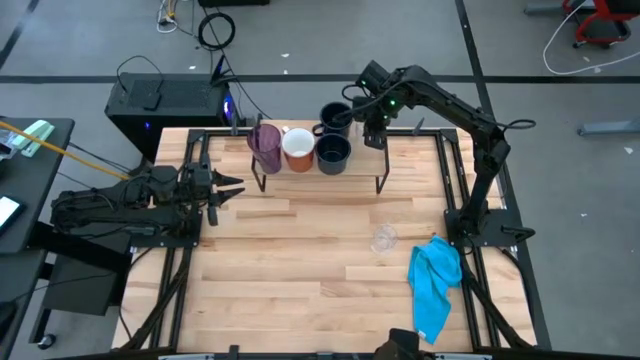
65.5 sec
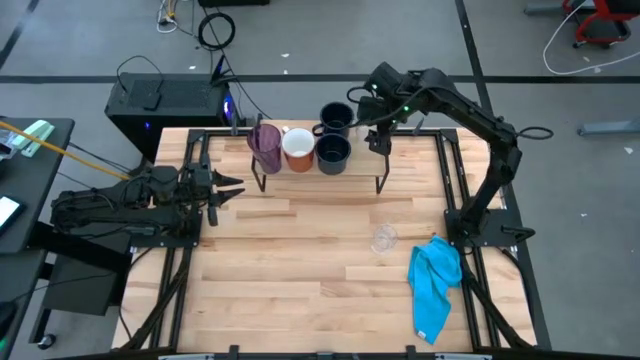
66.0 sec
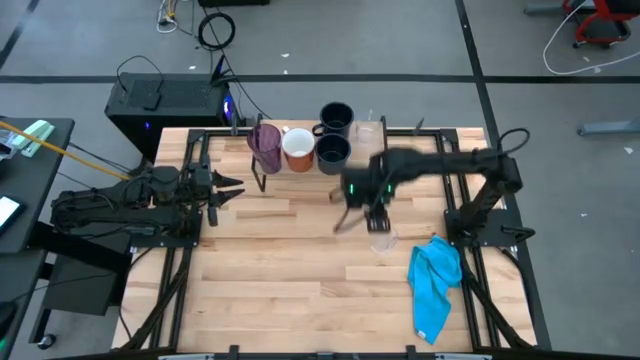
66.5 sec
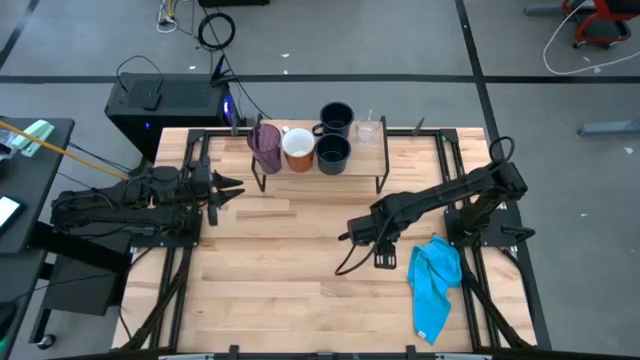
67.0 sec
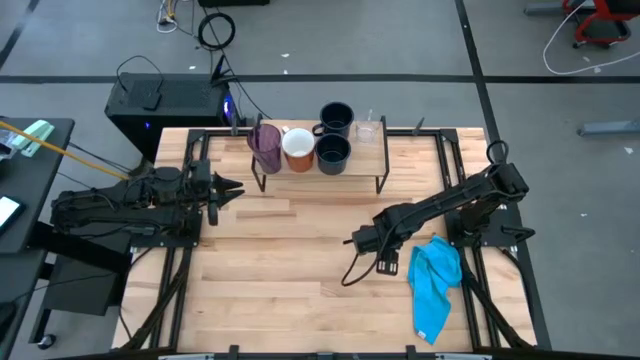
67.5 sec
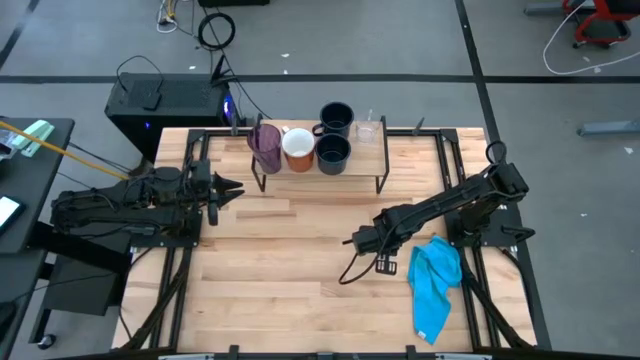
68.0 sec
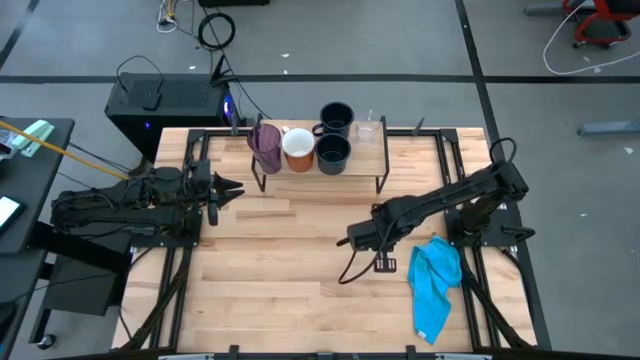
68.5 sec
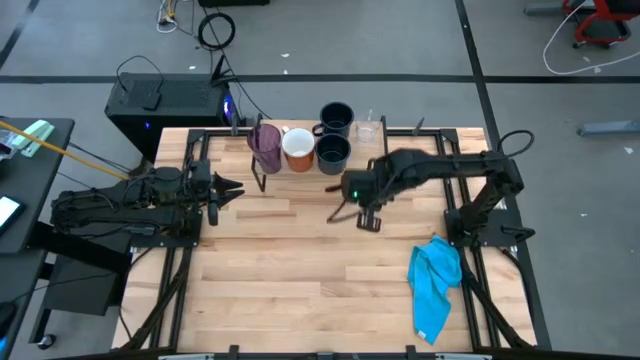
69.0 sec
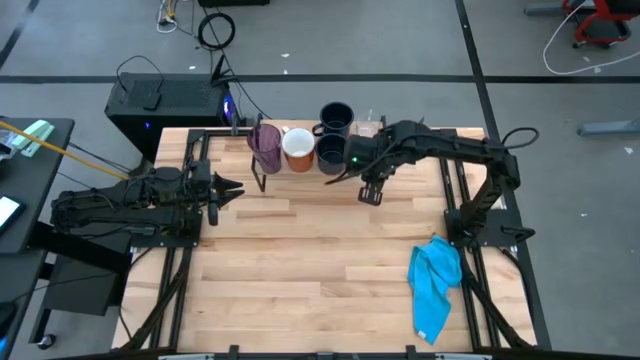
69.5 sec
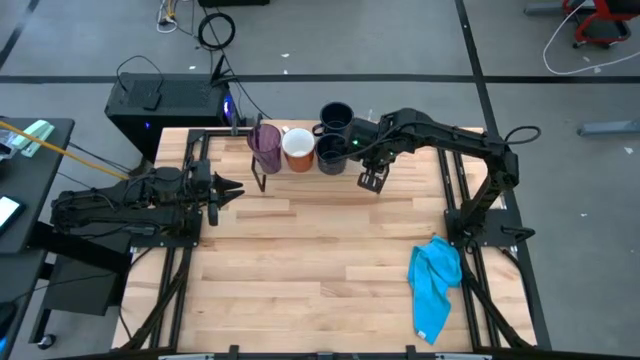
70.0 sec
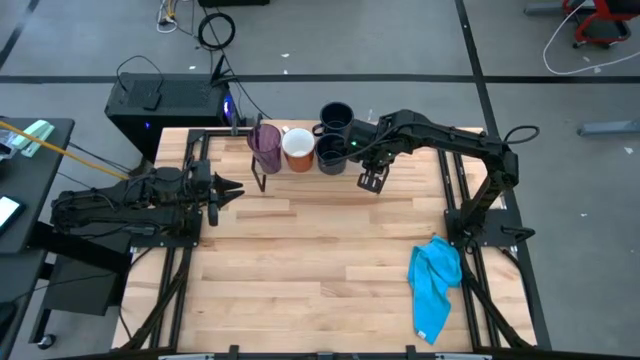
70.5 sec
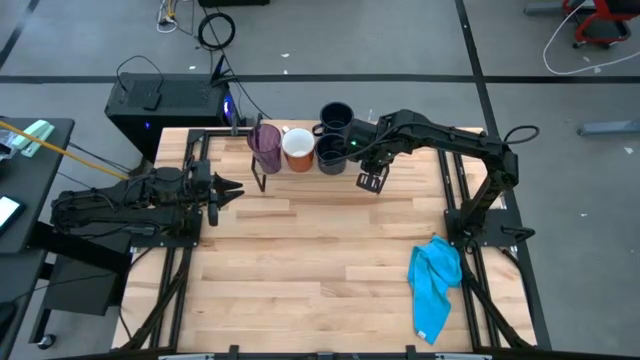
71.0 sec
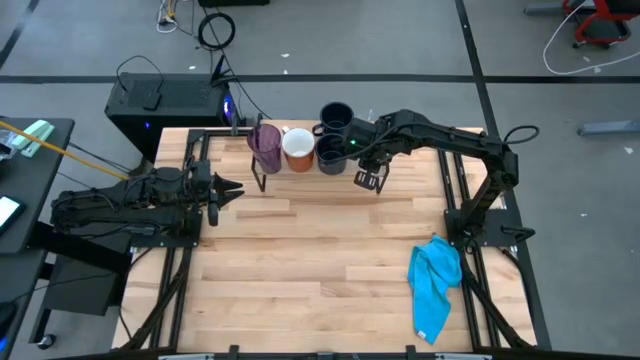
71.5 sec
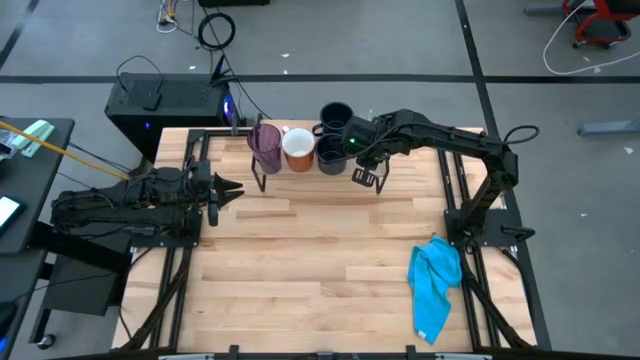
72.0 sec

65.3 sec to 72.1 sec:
Task: Stack small to large cups/mugs on shelf
Put the transparent mug on the shelf

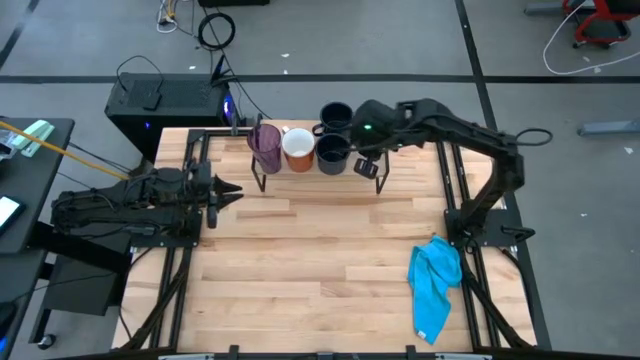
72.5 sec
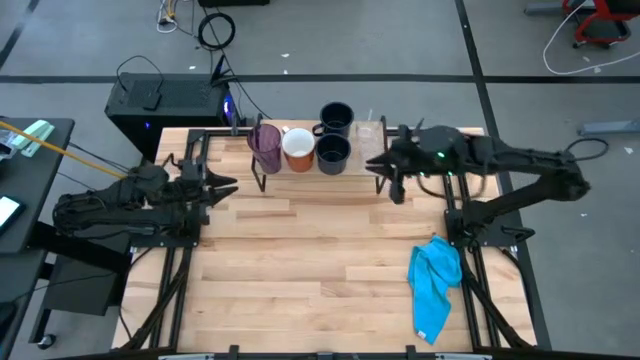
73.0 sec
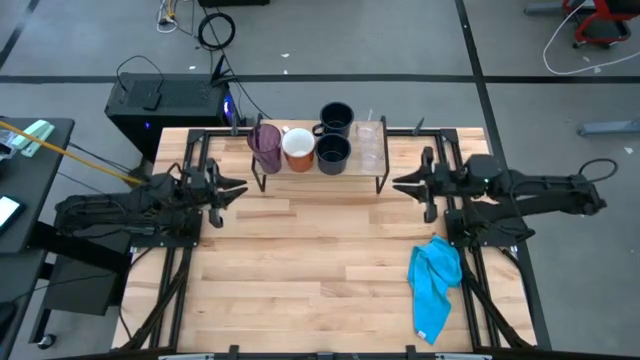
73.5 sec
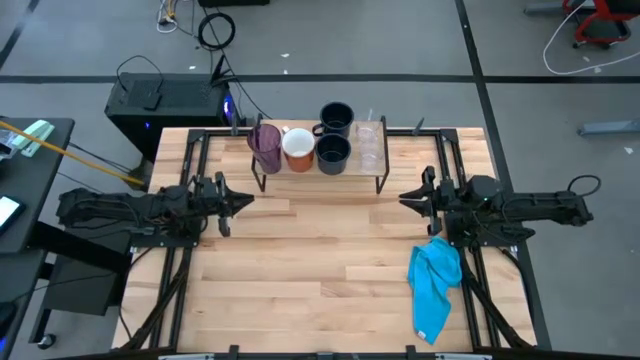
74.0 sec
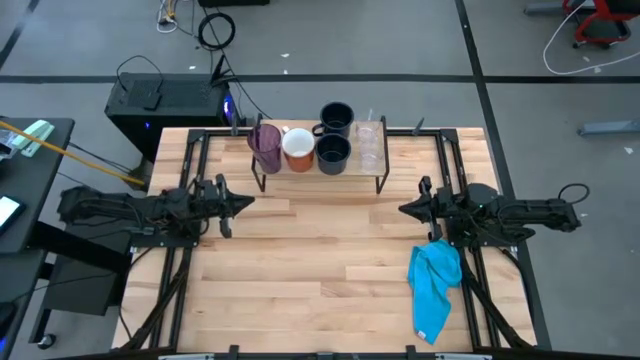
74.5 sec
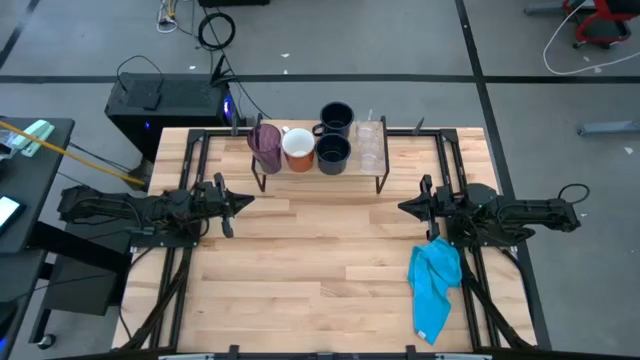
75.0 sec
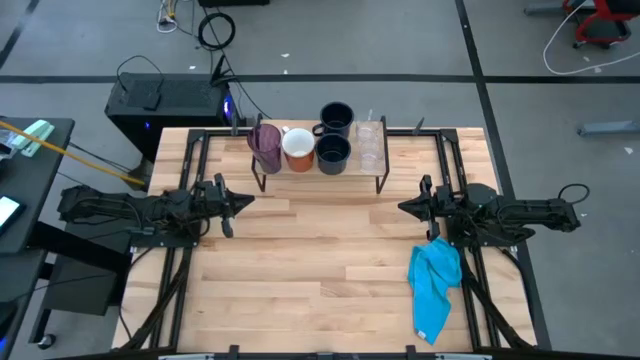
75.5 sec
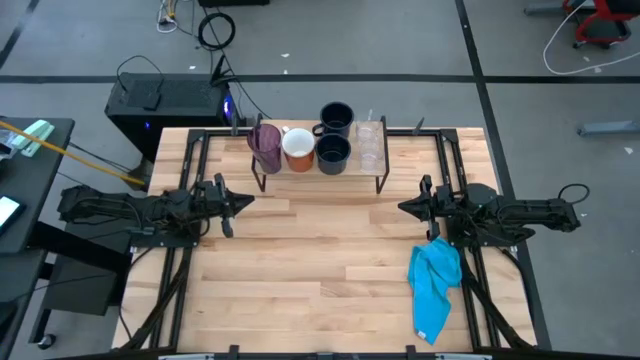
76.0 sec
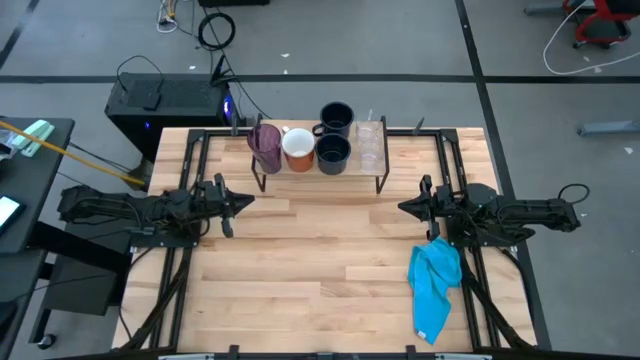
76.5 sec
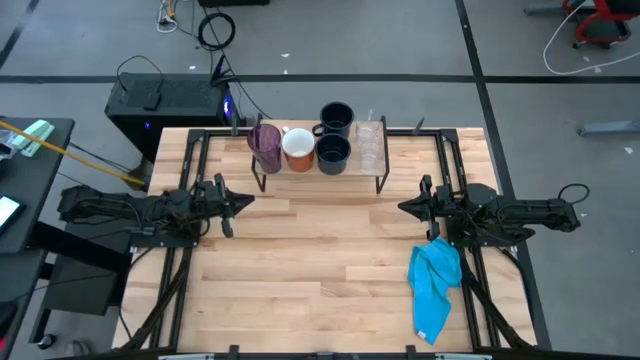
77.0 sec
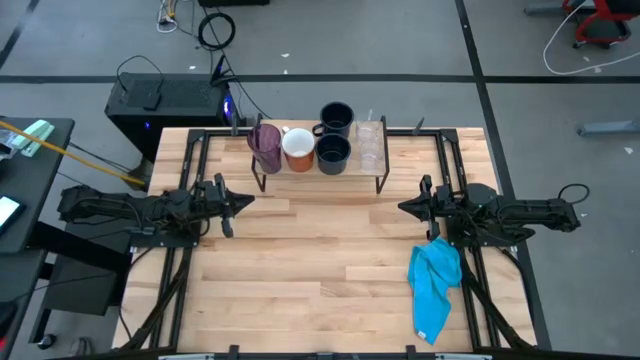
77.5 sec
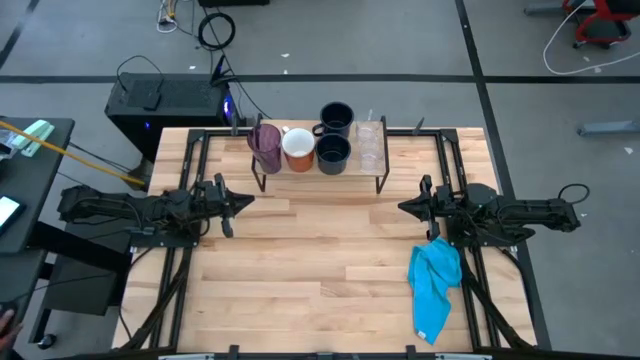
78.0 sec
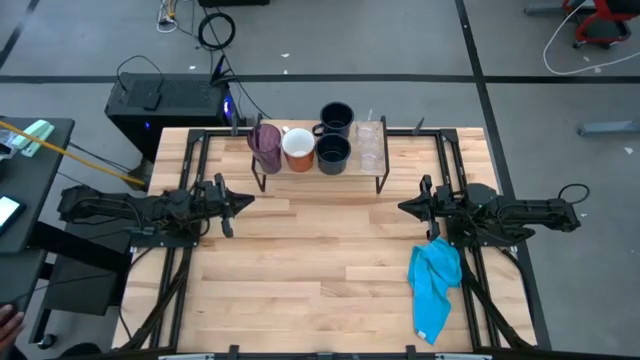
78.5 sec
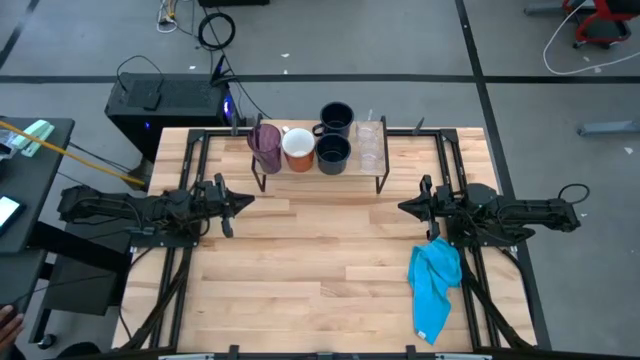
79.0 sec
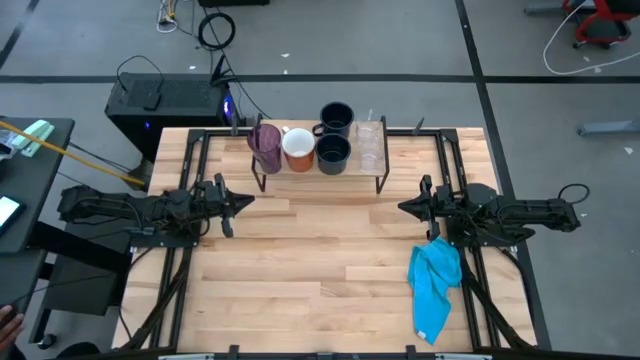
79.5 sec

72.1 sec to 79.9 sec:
Return to Home Position

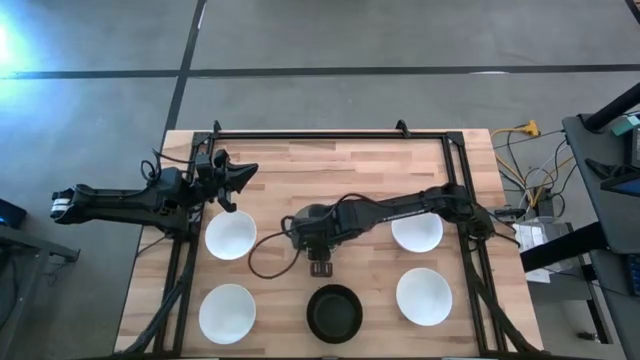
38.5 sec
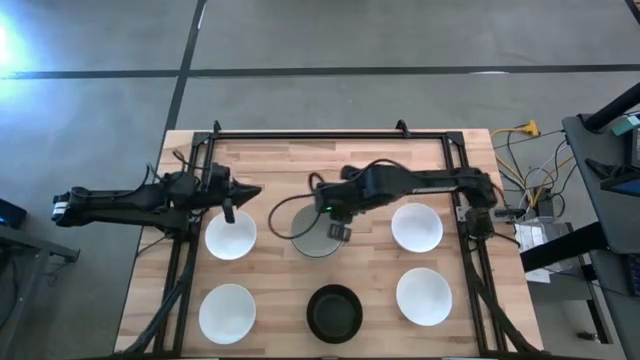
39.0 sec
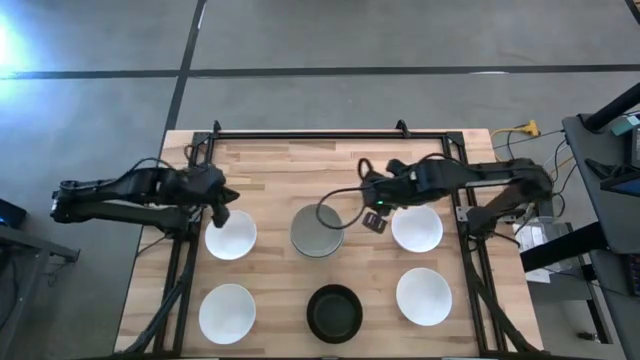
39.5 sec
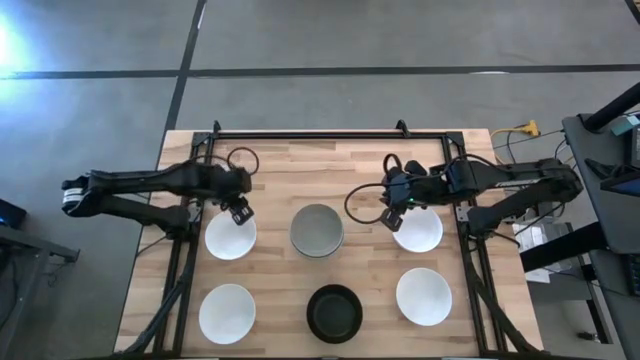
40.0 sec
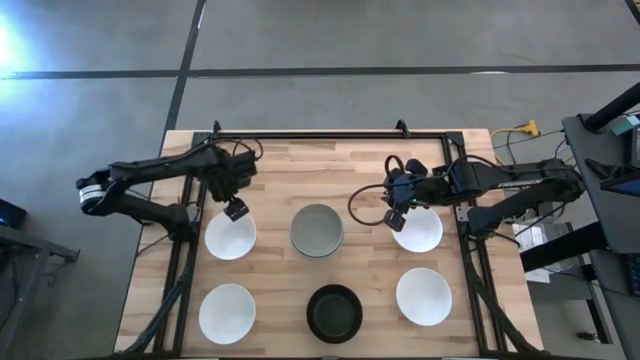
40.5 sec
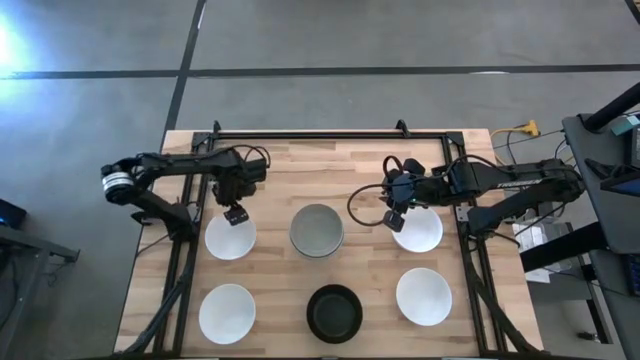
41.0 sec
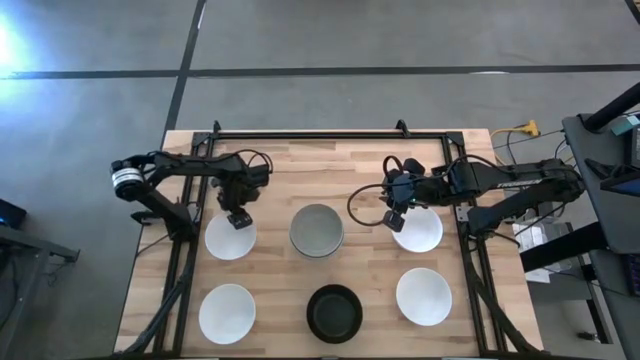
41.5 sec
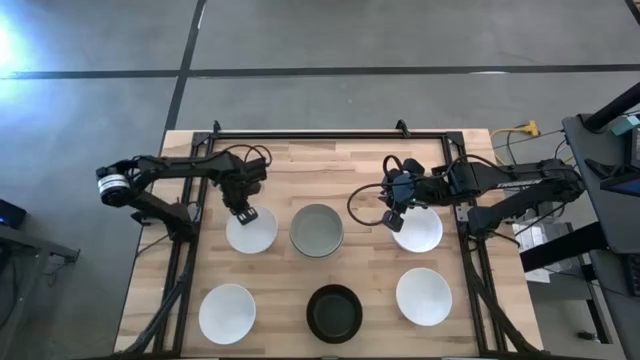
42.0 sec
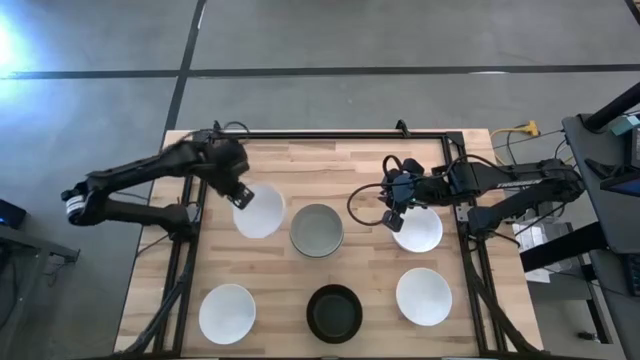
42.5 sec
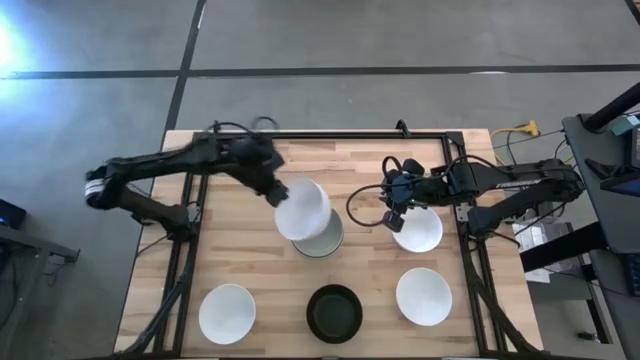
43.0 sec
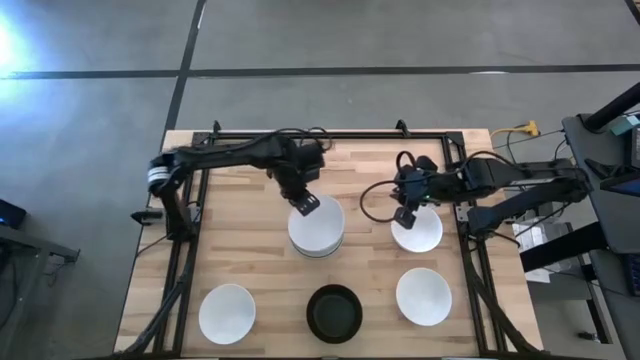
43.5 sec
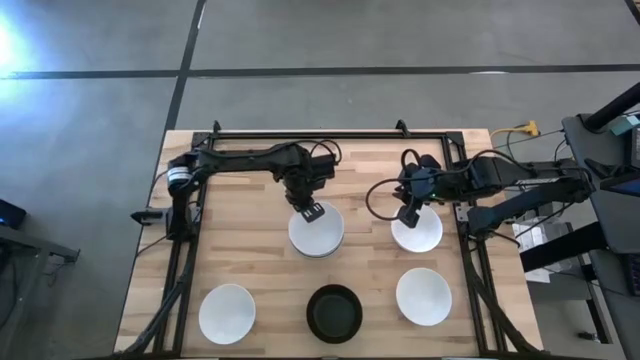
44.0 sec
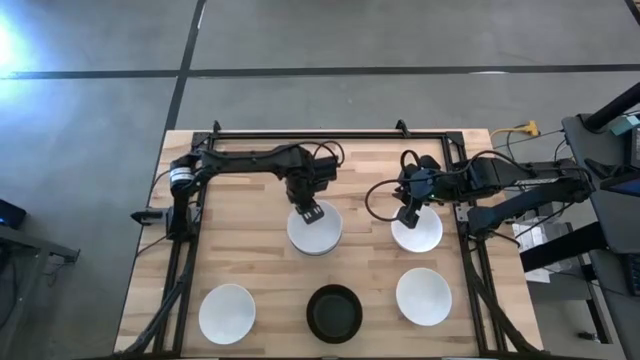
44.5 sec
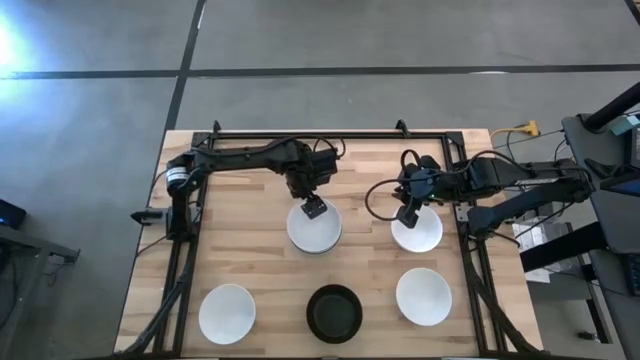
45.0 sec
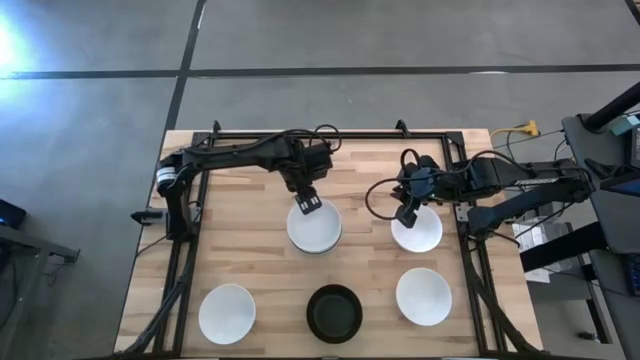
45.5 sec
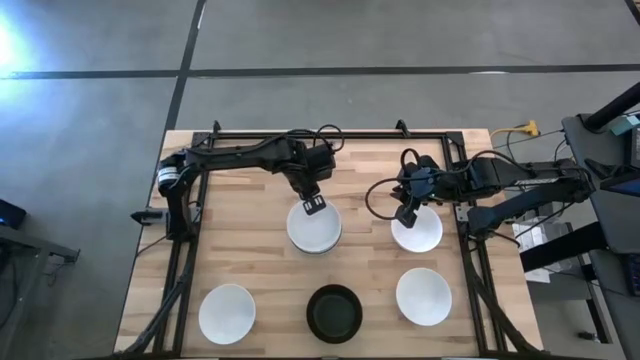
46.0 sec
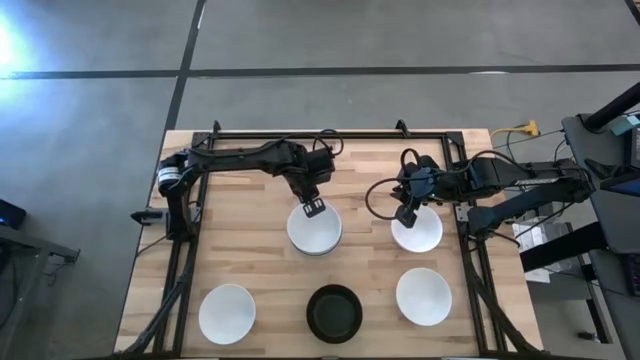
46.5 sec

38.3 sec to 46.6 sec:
Task: Nest bowls inside each other
Stack the white bowl on top of the light gray bowl
